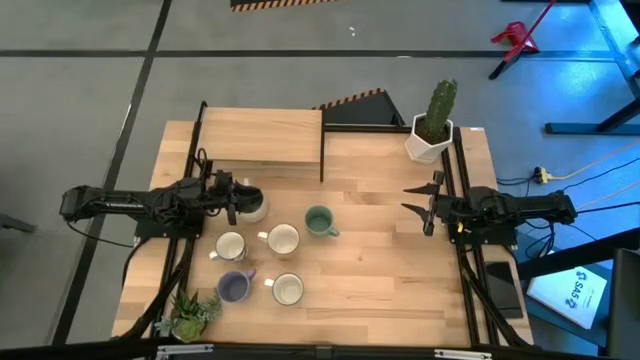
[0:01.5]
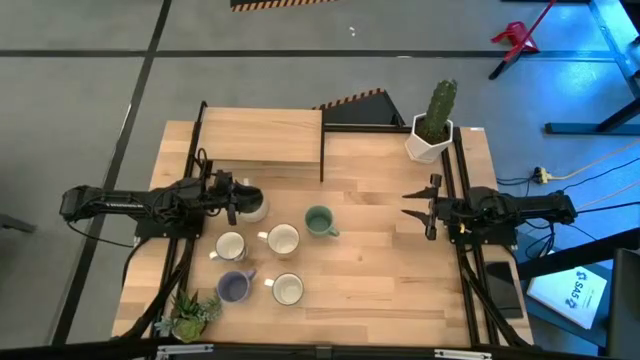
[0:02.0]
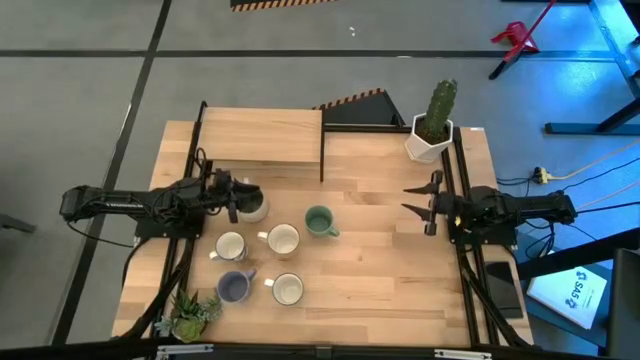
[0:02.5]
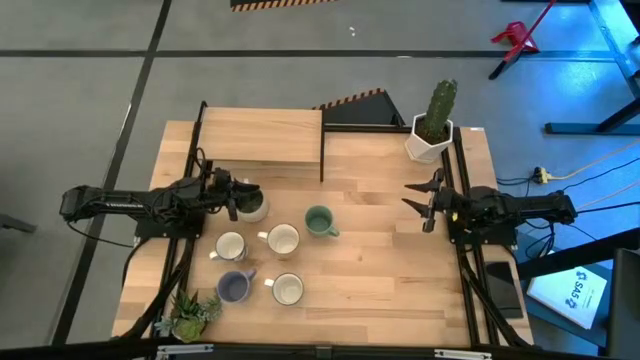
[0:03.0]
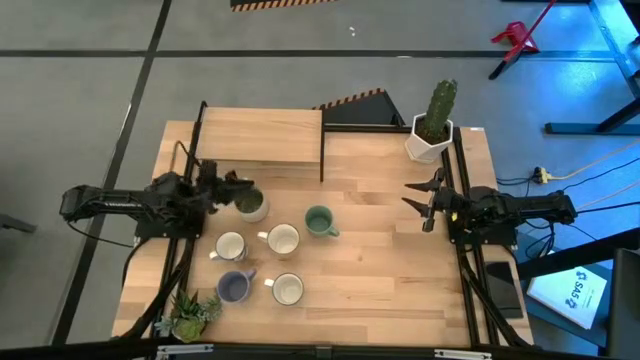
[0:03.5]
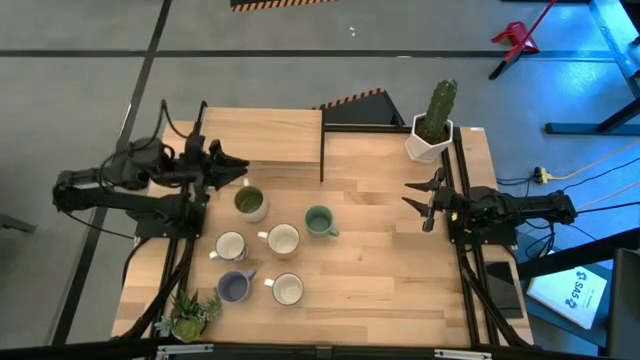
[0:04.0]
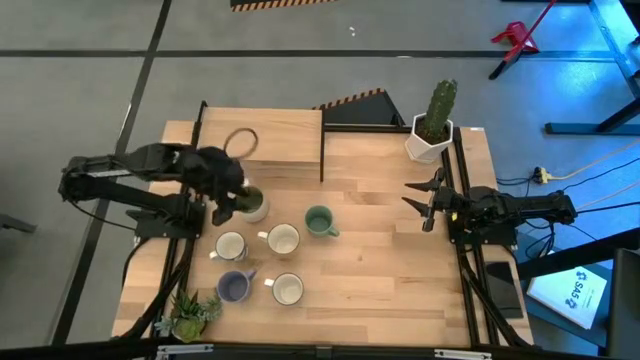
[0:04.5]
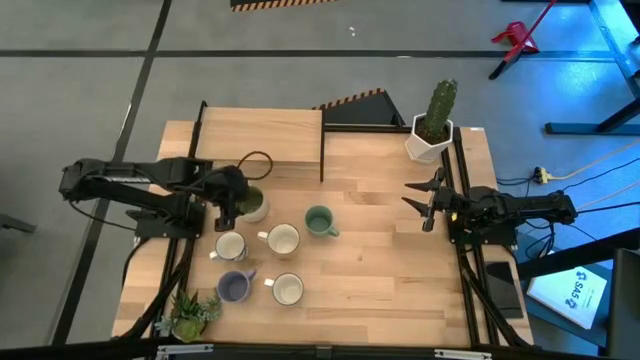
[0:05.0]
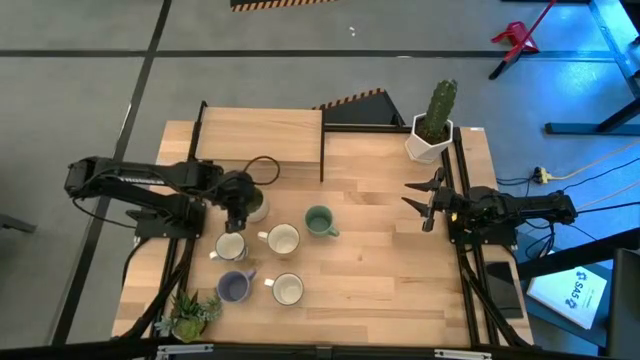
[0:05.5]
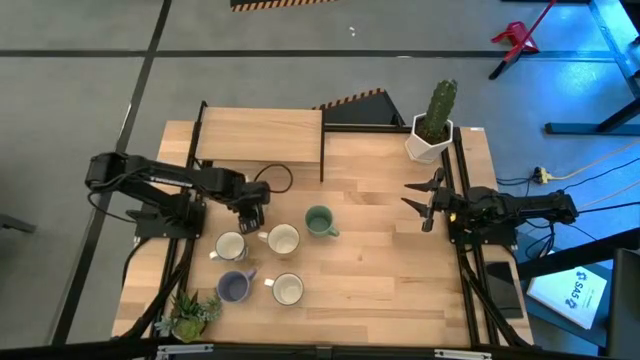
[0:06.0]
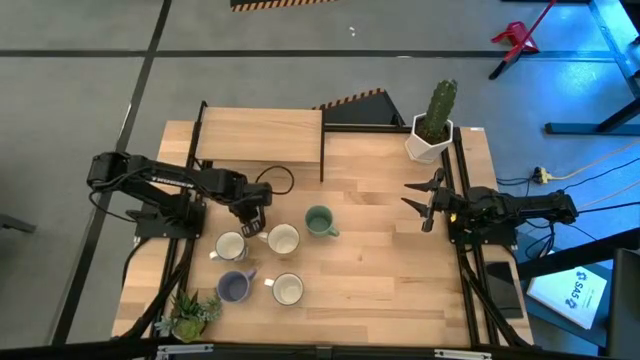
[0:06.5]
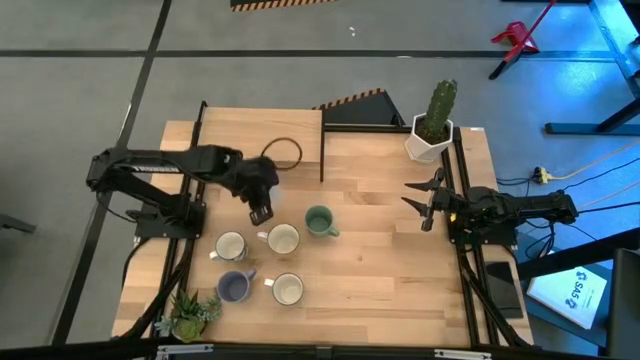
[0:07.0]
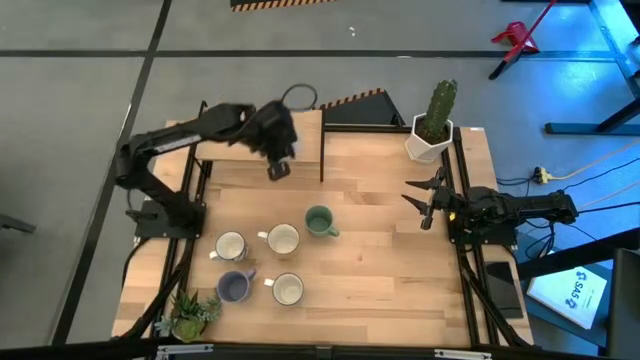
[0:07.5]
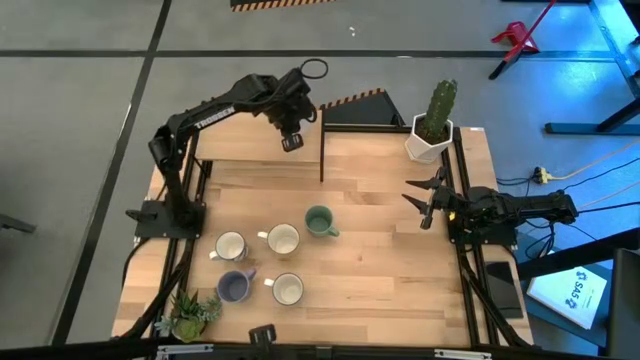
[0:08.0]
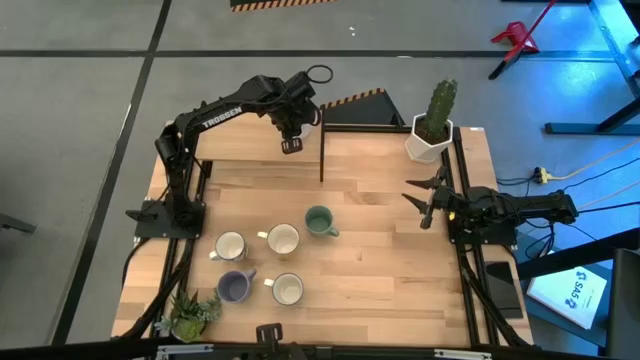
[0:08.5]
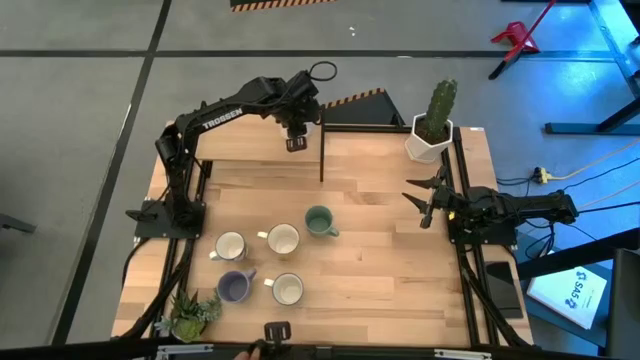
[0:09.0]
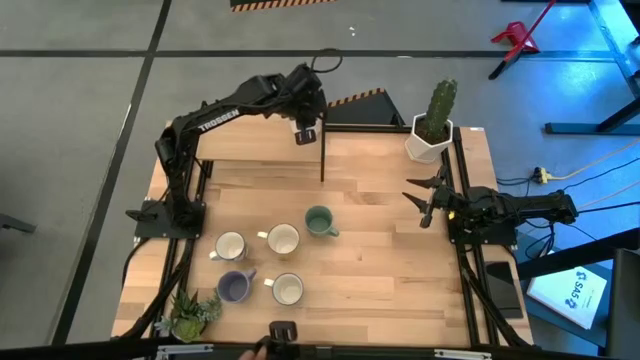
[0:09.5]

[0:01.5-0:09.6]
Task: Place coffee mugs
Put the green mug on the shelf

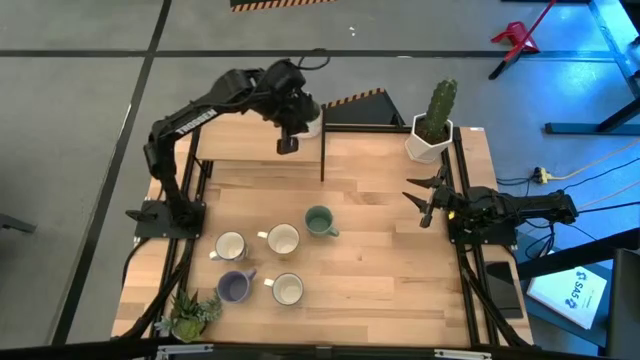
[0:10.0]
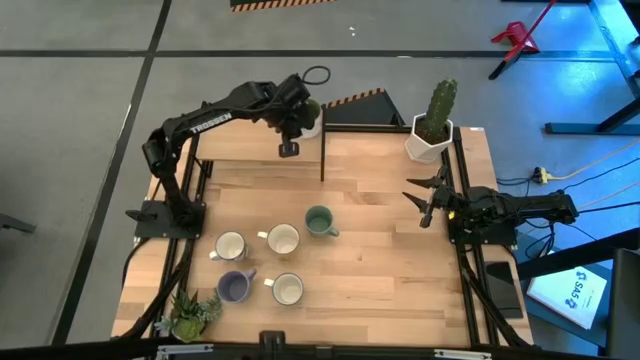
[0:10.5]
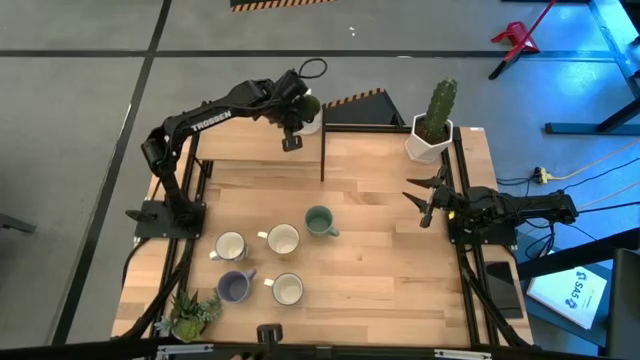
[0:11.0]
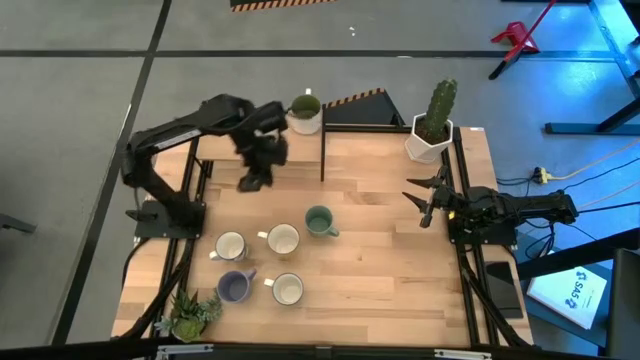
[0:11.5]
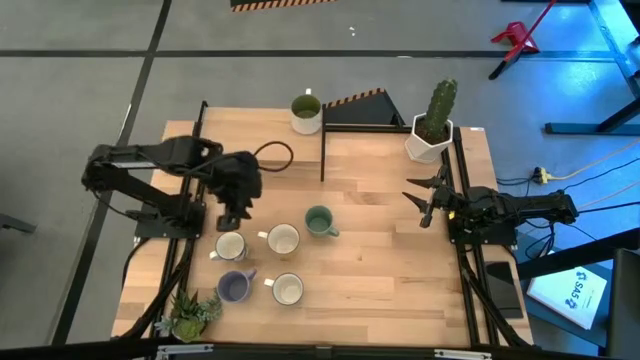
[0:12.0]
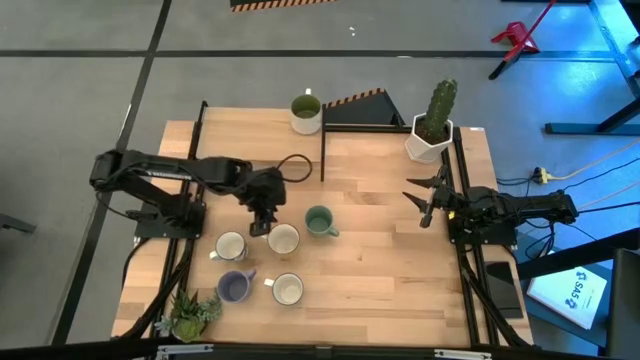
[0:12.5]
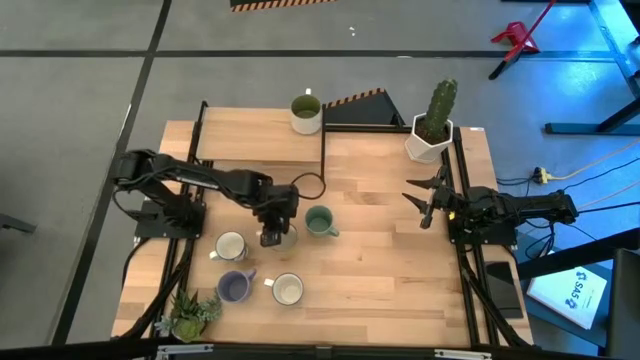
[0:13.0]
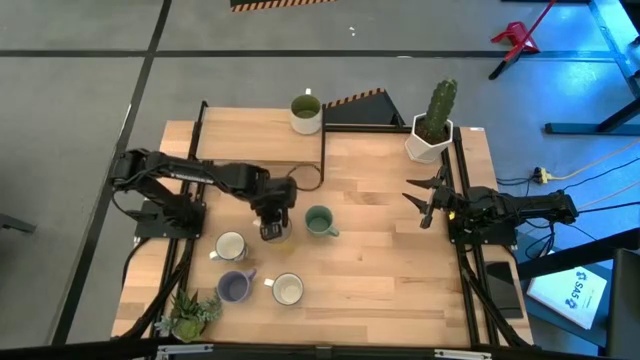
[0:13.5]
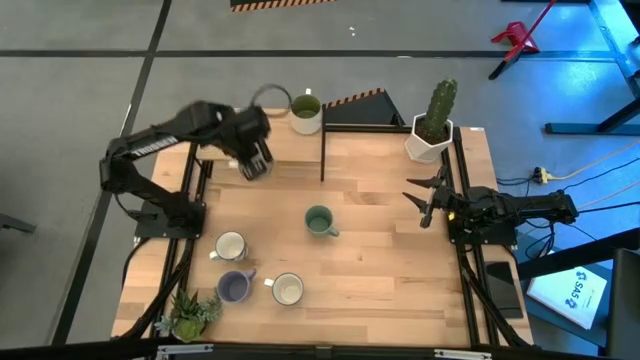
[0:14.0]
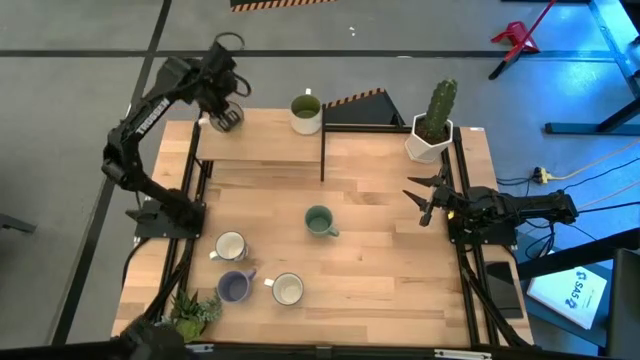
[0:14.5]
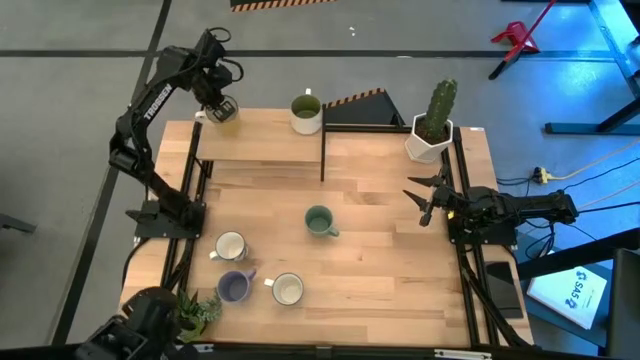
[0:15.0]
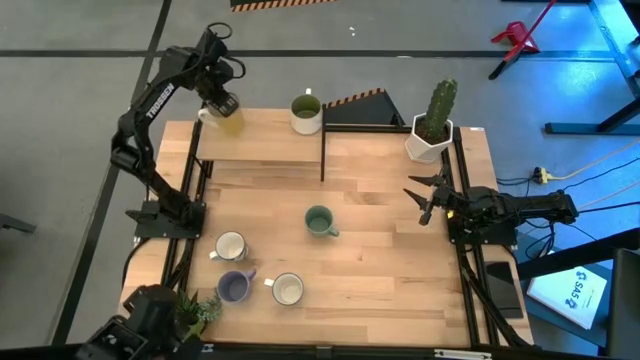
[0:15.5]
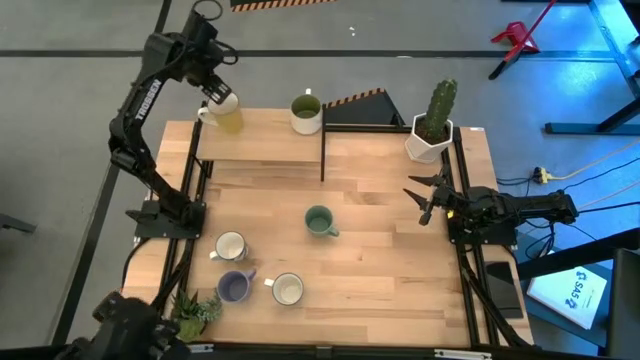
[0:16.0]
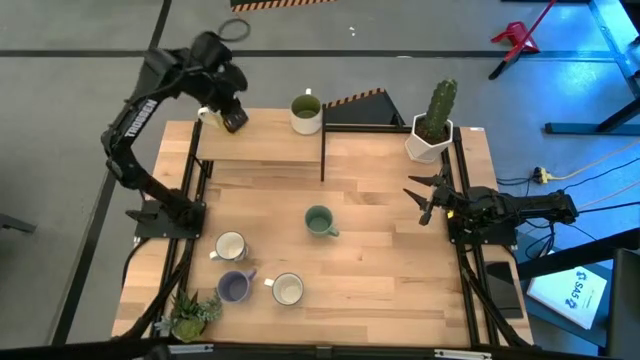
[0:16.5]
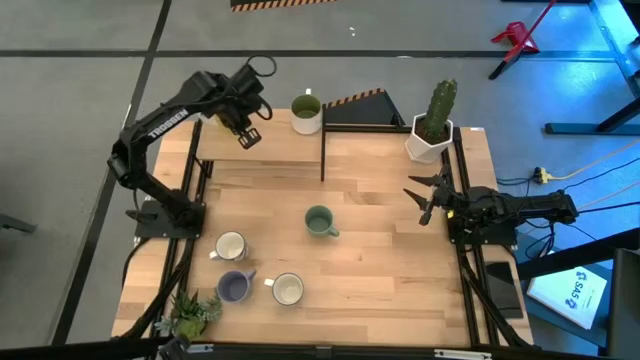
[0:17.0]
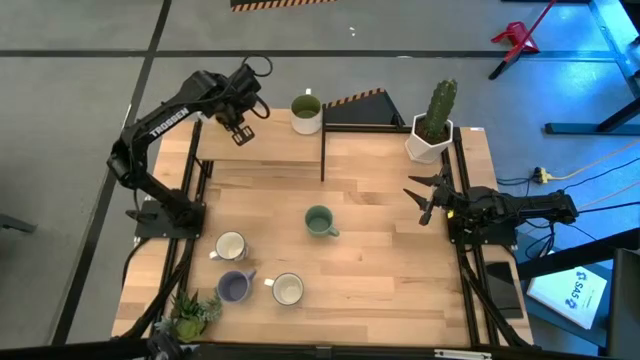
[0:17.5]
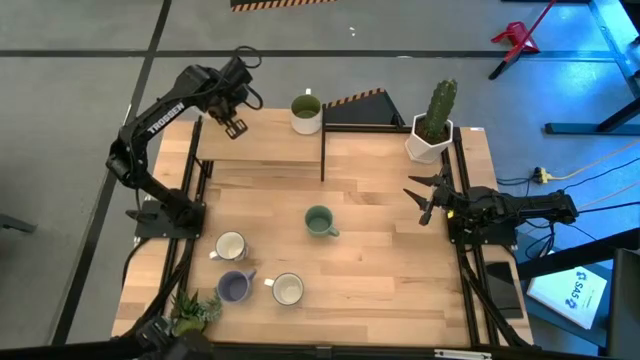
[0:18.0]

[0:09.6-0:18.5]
Put the yellow mug on the shelf

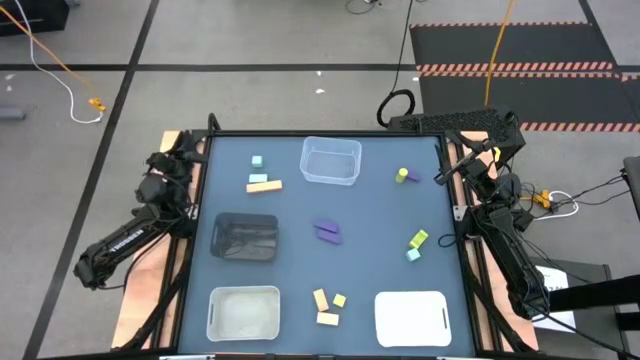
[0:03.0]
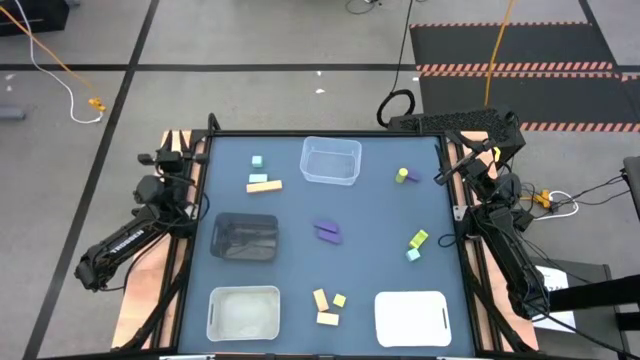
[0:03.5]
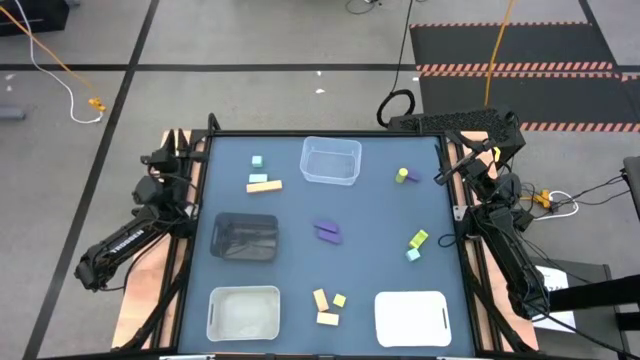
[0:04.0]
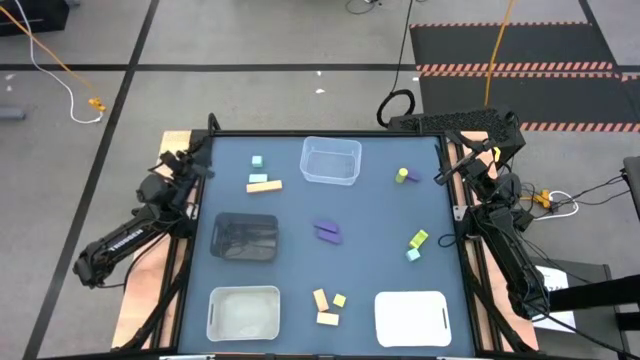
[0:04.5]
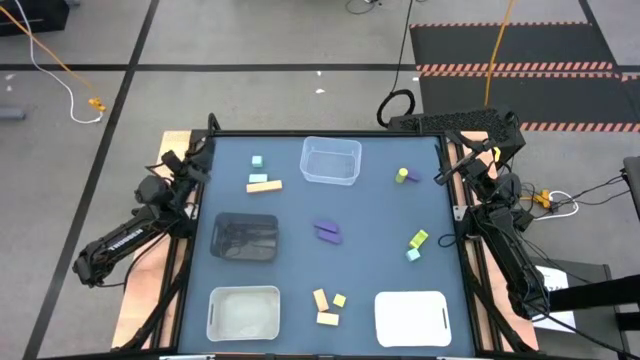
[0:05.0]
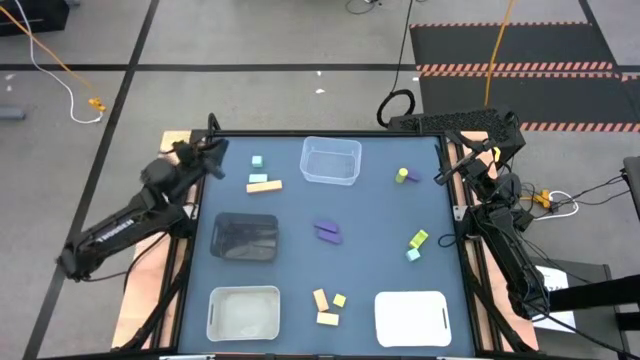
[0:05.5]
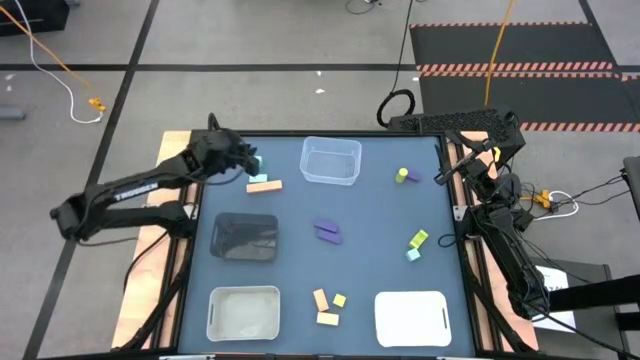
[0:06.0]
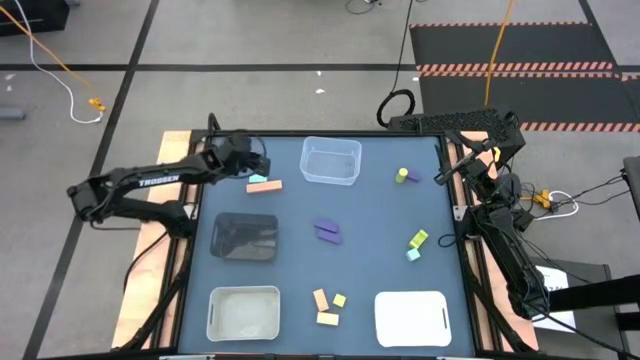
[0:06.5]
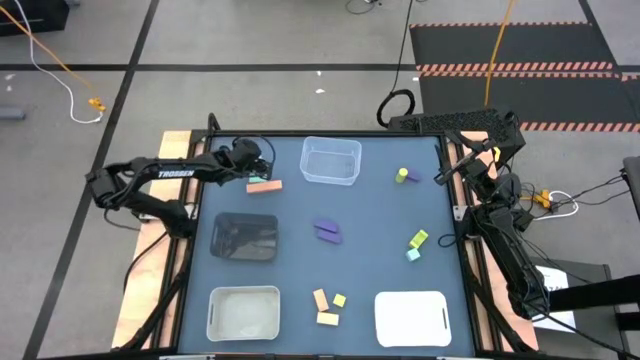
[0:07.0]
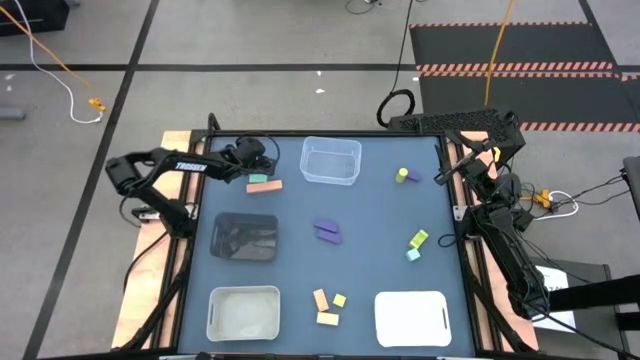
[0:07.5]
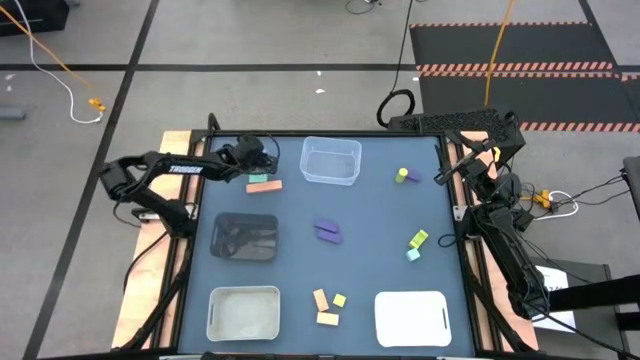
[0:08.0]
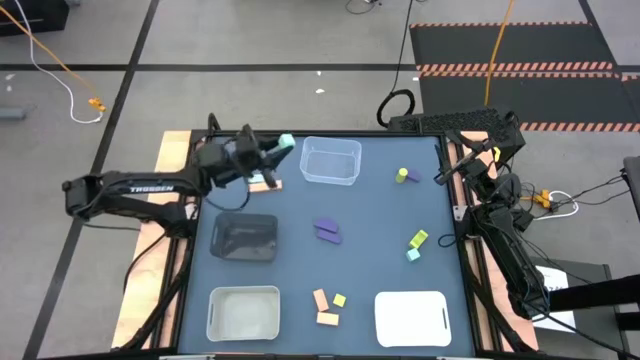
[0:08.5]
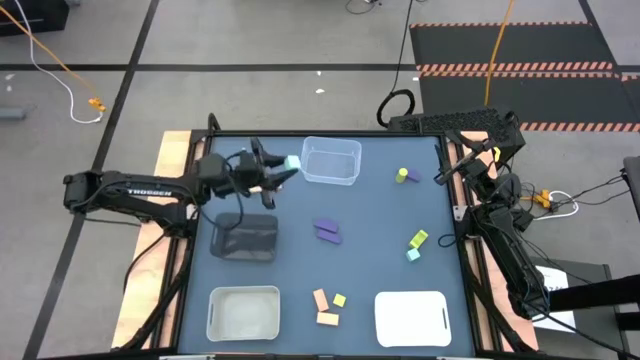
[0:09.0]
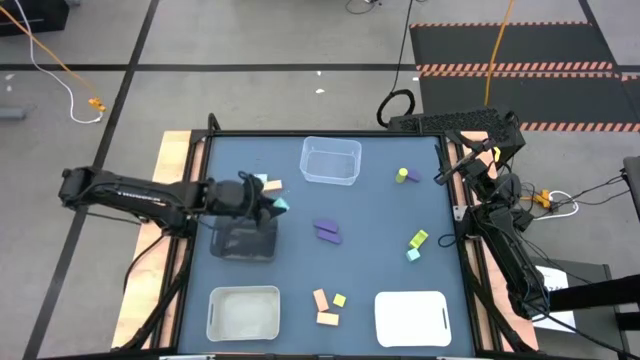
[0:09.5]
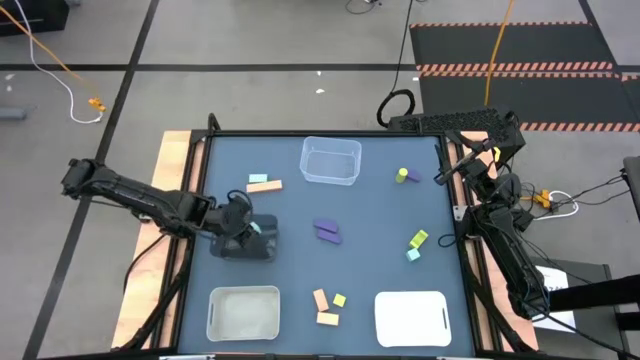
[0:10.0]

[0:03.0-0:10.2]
Task: Sort & place blocks by color
Put the top left blue blocks into the black bin
